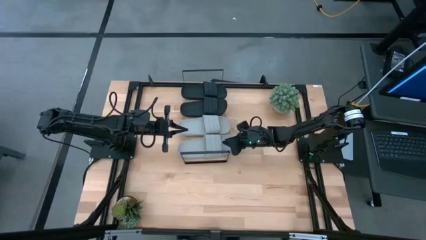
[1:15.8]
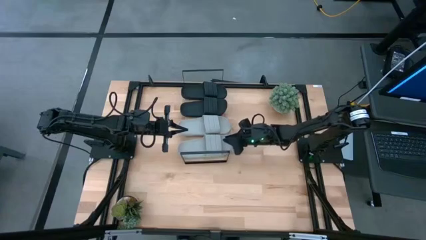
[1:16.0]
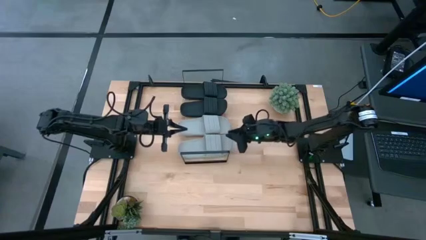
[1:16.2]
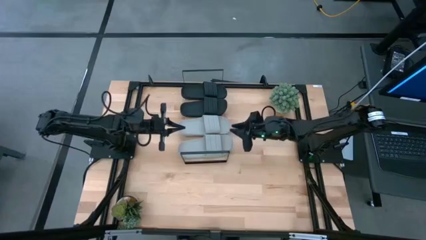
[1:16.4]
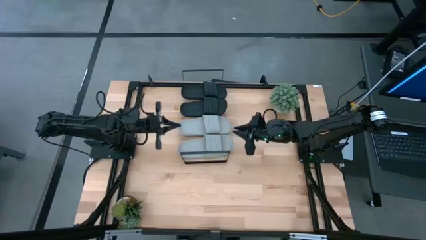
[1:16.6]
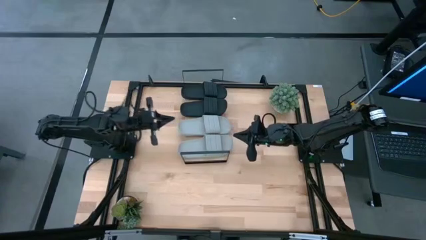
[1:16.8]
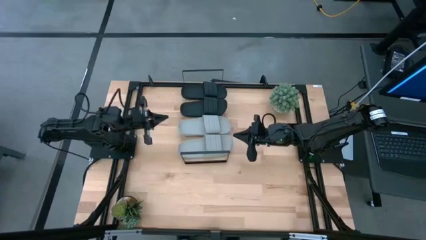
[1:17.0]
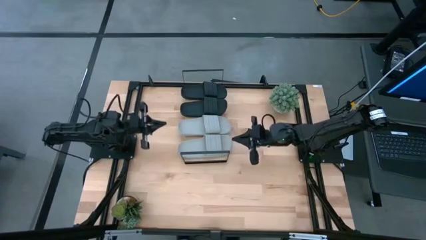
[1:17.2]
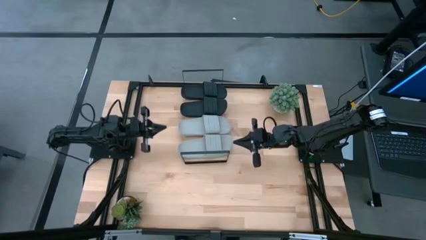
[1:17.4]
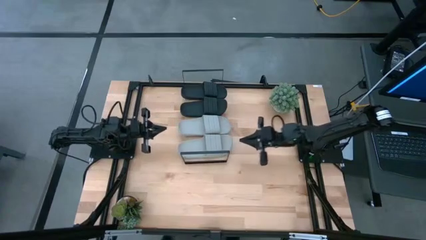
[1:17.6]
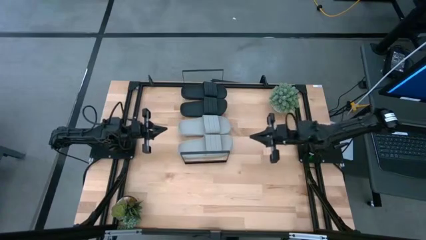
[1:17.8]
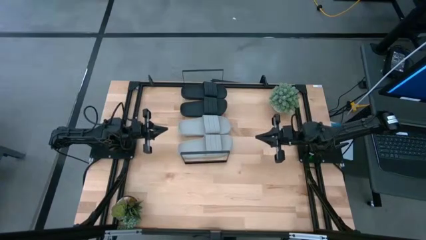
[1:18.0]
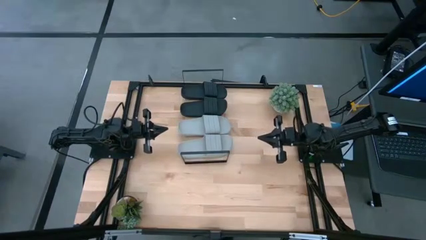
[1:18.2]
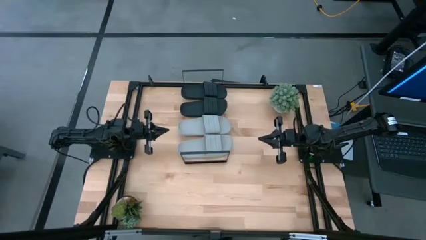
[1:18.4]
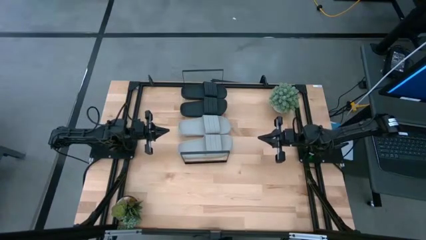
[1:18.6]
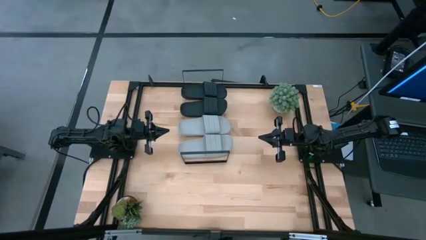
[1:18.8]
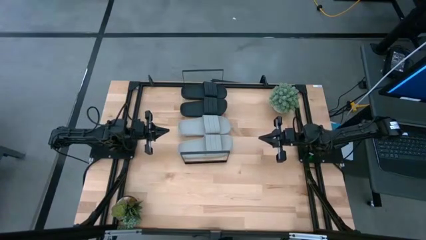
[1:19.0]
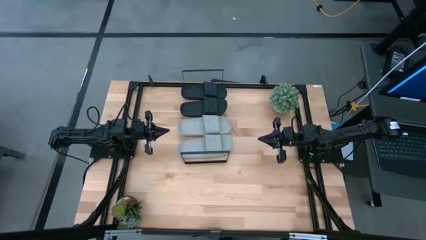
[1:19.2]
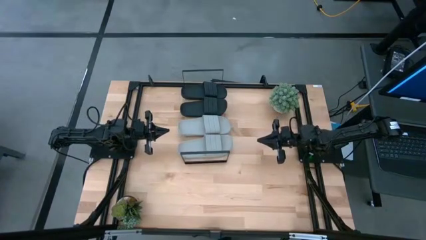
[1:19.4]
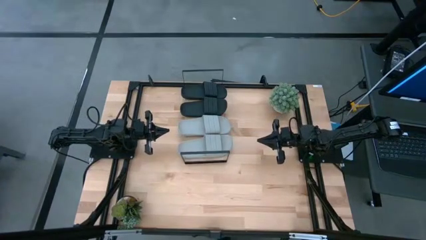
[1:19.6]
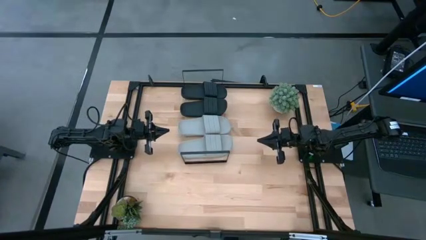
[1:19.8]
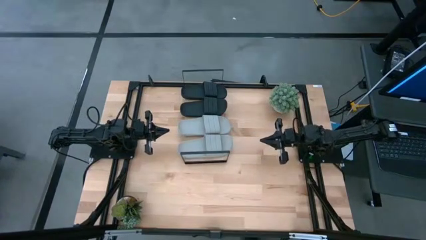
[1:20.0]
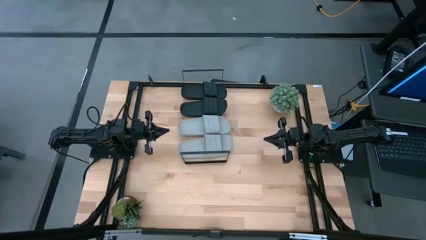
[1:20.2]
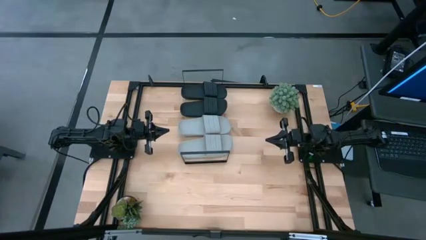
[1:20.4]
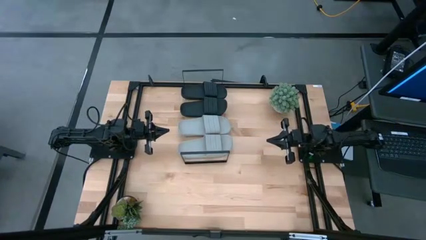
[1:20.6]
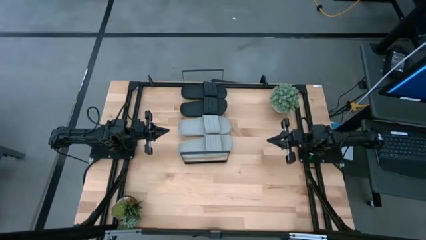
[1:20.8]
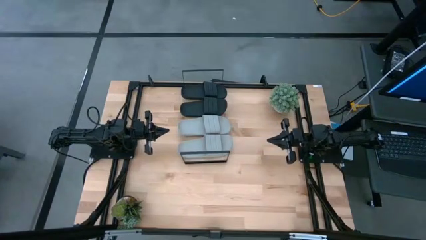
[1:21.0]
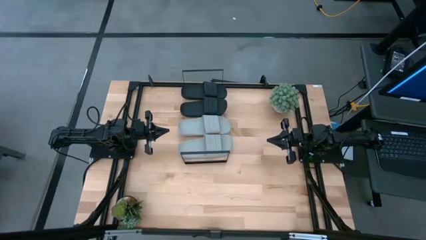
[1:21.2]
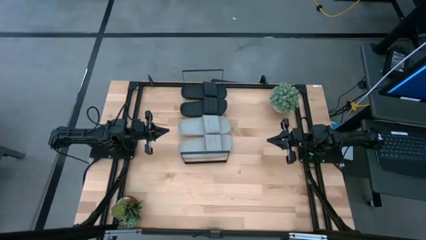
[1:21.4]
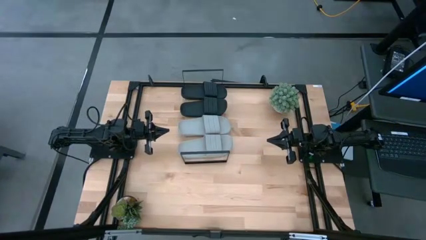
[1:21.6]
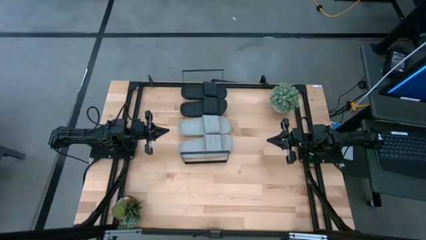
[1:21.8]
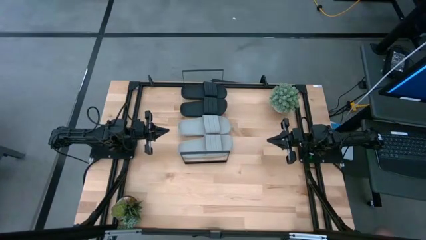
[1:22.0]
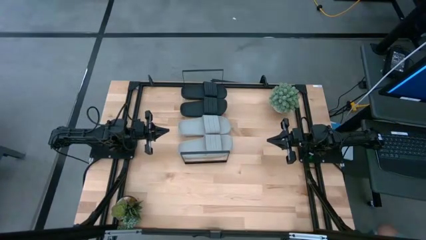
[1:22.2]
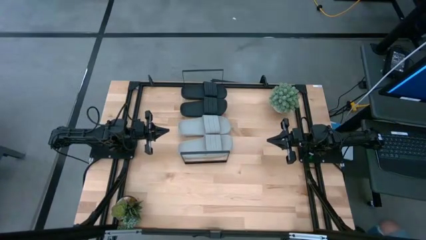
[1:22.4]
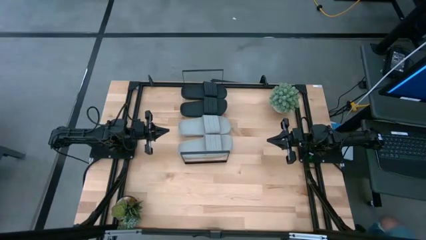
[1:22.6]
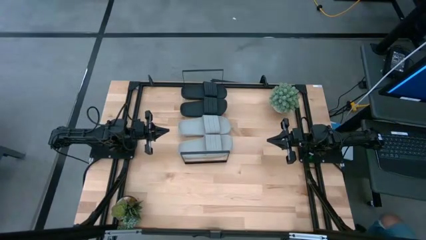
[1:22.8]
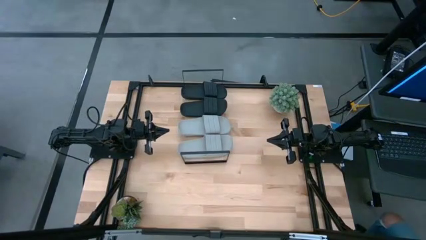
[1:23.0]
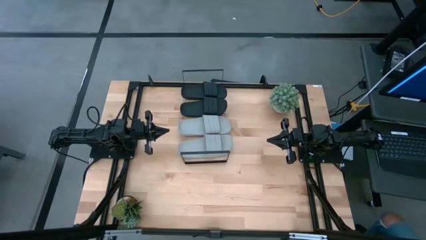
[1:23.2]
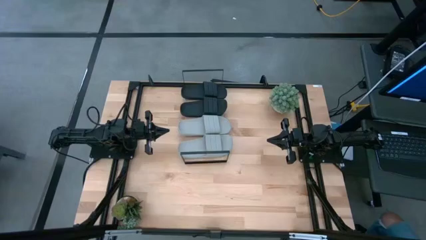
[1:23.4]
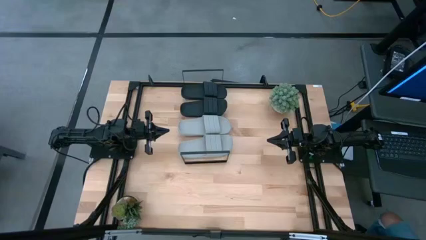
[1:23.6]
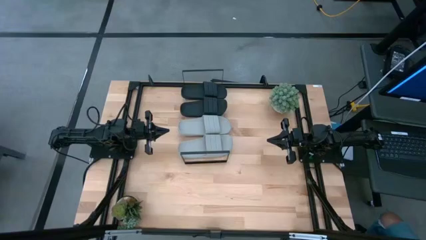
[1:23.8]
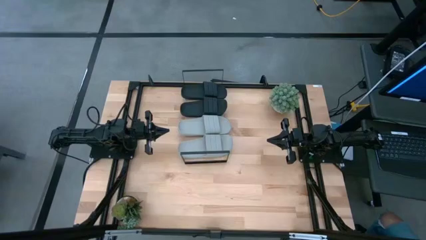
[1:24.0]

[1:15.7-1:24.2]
Task: Pick and place slides into the shelf
Return to Home Position

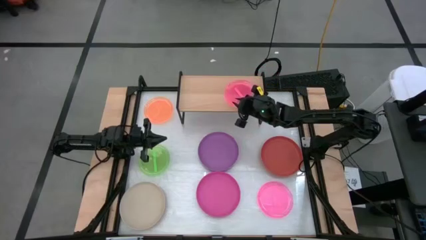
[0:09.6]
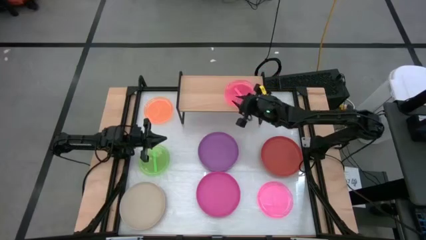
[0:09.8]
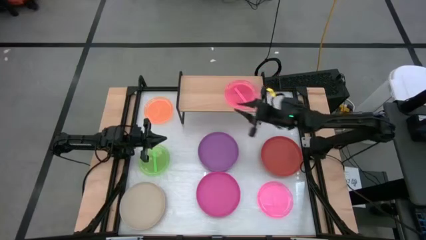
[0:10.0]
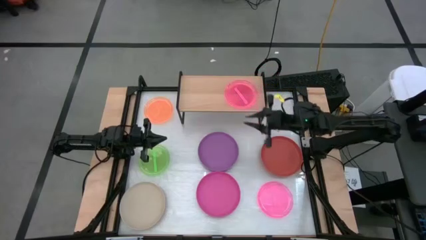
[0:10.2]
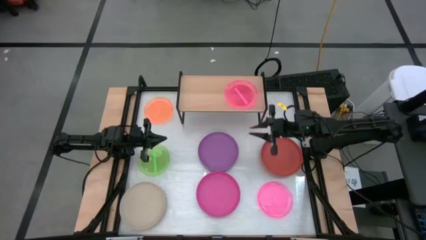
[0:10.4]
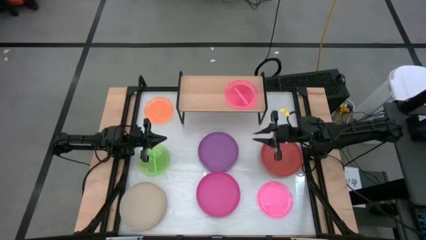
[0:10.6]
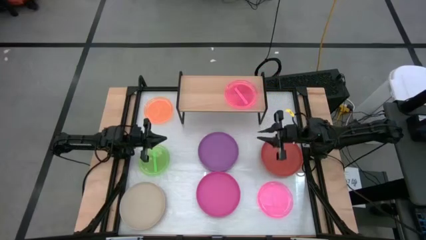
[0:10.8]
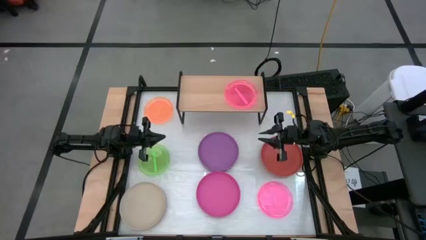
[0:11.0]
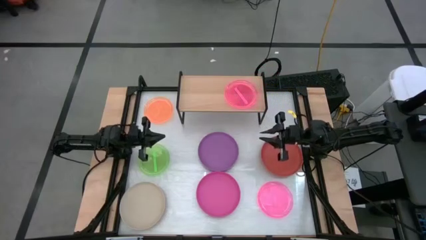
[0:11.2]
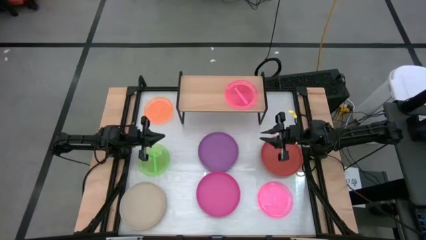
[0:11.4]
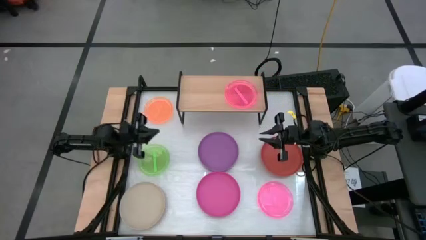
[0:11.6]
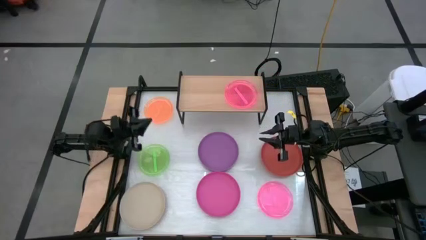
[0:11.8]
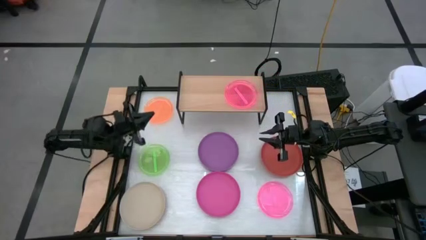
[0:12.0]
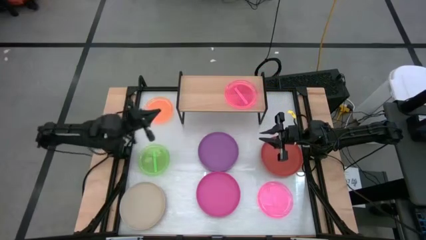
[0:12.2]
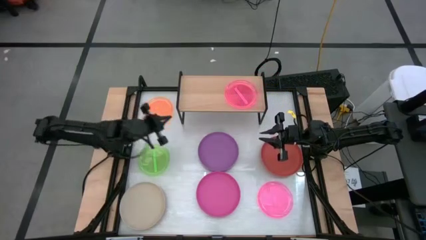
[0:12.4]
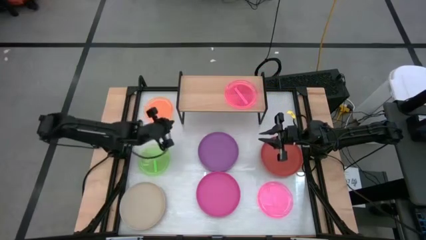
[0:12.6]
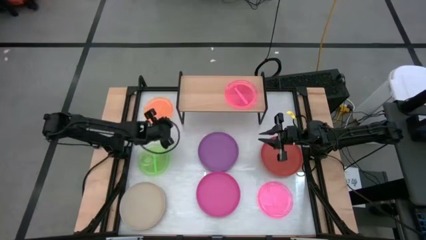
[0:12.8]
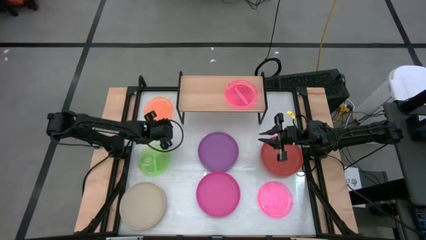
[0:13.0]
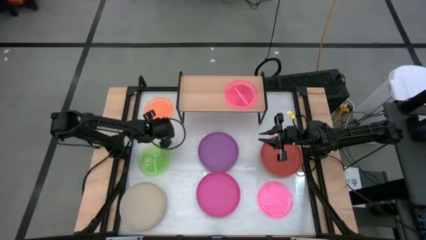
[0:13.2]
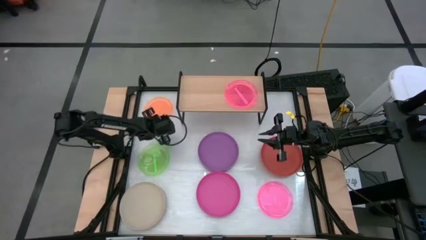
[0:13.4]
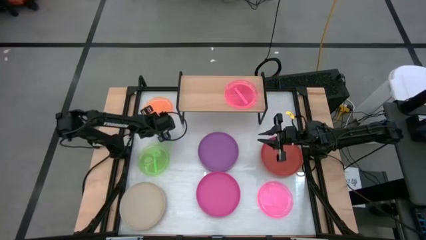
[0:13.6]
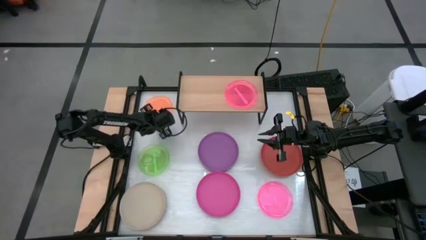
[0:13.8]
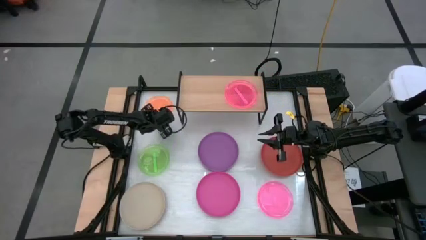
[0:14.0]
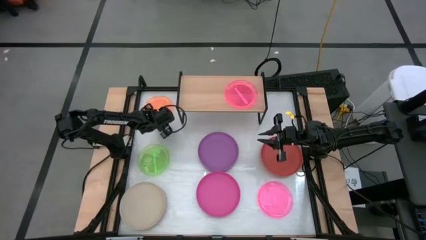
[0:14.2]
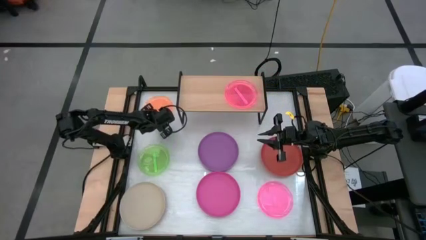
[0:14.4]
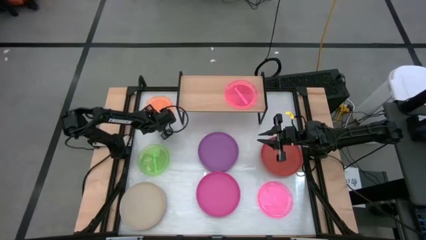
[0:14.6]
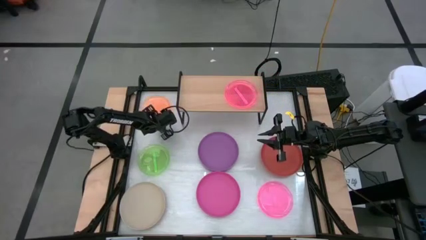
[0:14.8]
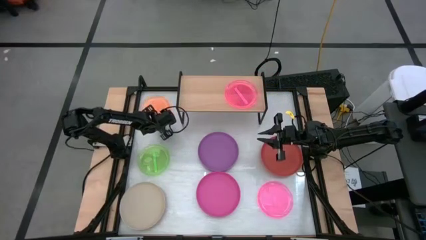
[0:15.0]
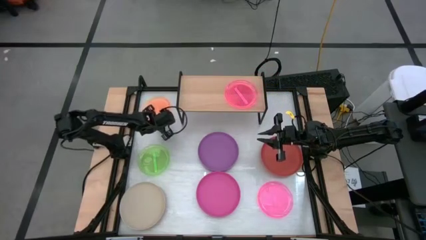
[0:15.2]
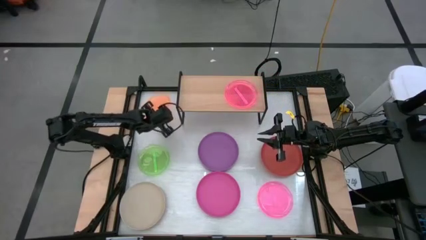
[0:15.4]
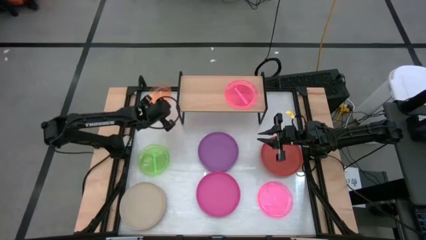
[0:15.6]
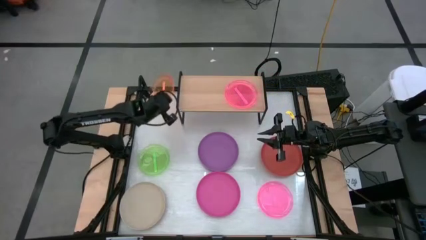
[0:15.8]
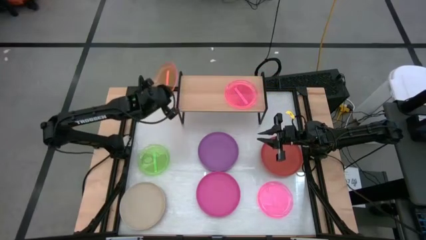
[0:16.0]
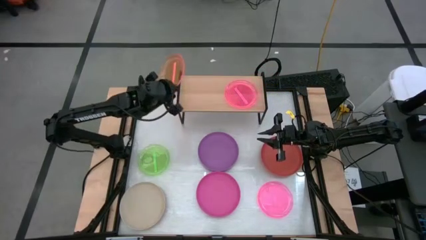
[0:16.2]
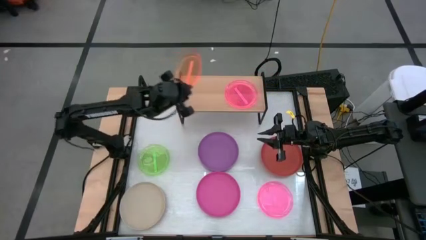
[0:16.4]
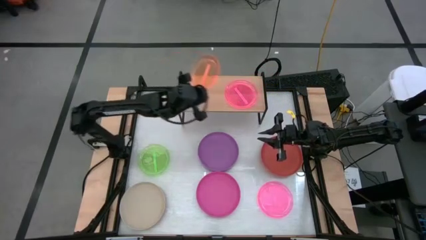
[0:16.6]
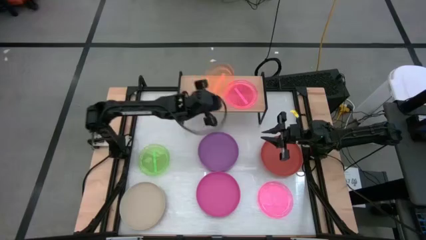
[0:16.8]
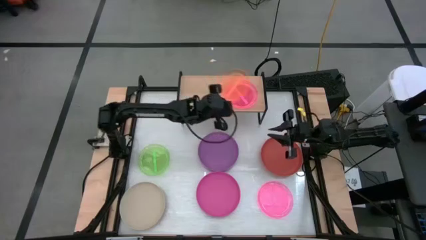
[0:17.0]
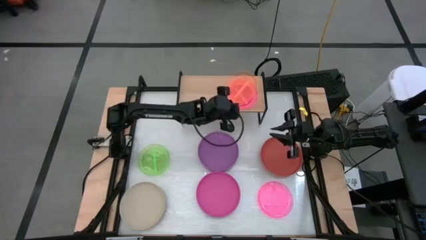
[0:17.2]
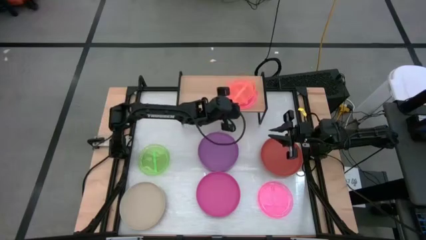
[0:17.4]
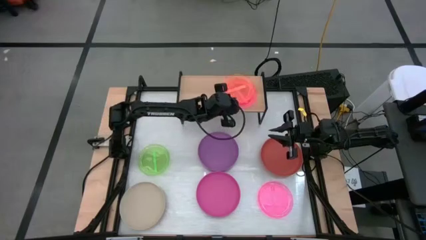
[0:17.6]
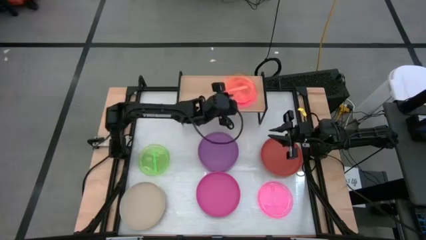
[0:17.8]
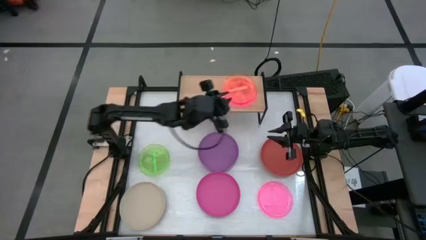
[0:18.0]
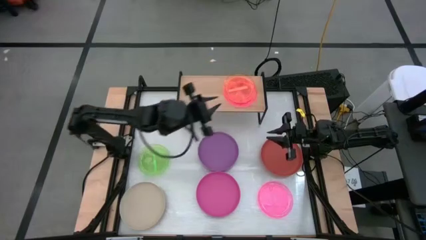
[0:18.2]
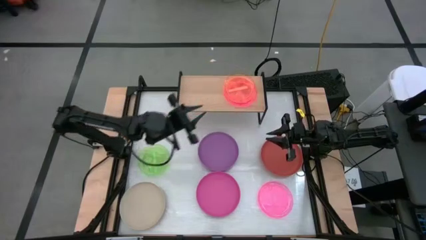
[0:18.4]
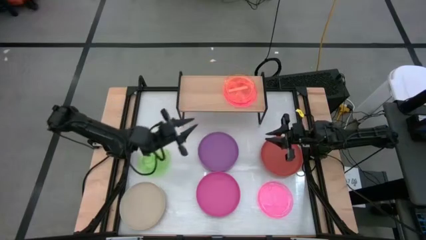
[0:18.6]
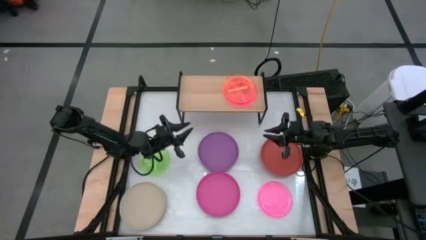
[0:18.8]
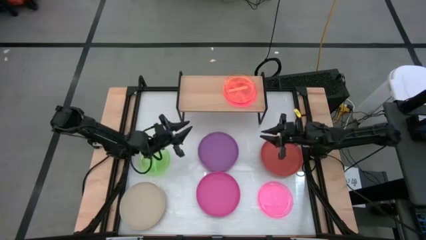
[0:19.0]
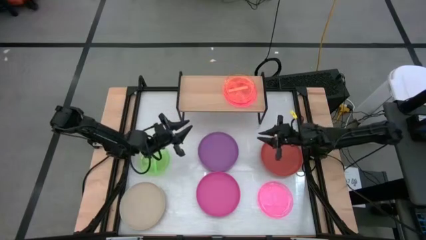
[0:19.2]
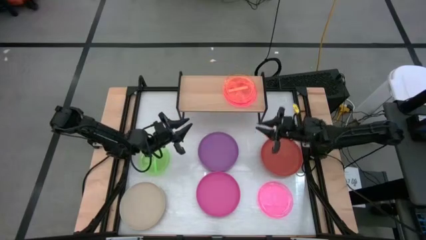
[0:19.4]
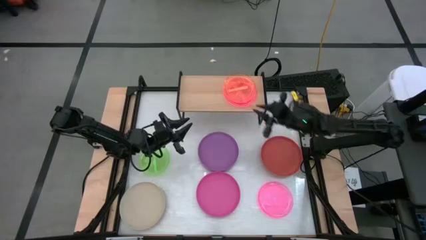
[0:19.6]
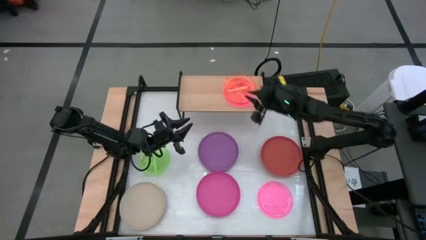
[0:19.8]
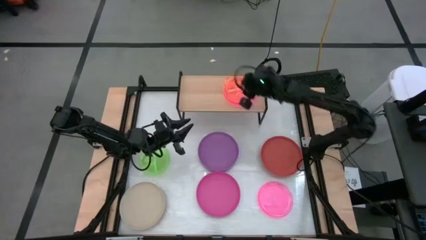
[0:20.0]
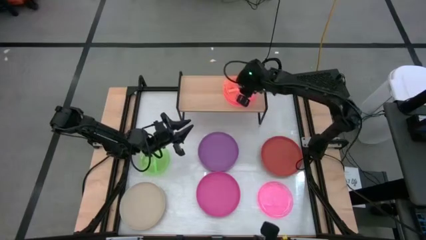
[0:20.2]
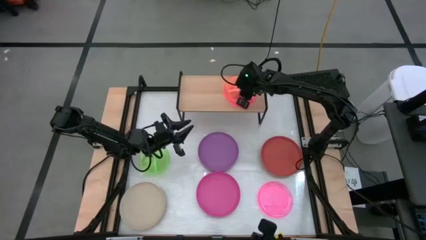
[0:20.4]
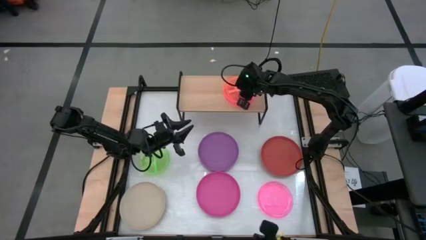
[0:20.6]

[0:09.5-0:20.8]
Task: Place and stack plates onto a shelf
Stack the light orange plate on top of the light pink plate on the shelf
